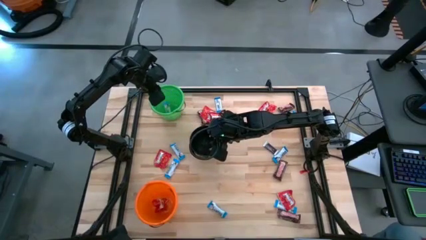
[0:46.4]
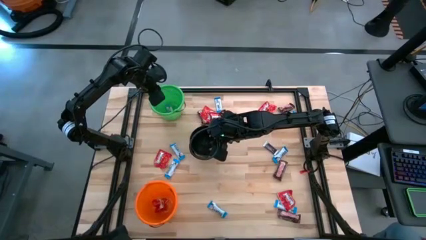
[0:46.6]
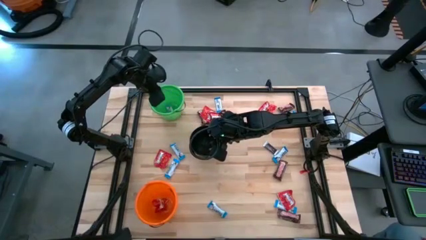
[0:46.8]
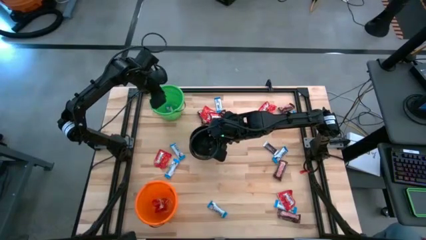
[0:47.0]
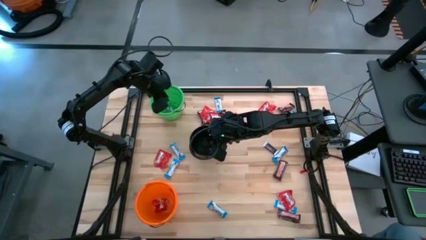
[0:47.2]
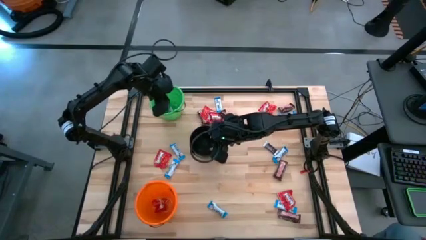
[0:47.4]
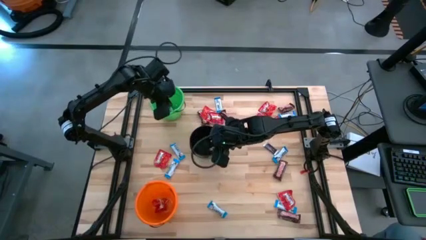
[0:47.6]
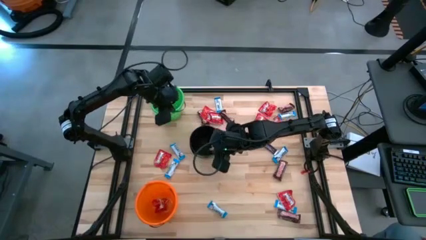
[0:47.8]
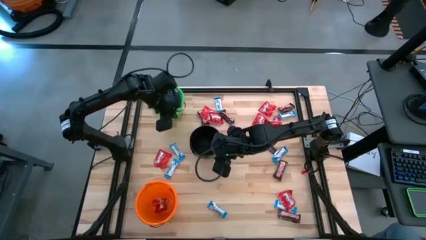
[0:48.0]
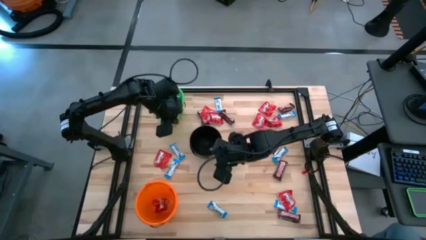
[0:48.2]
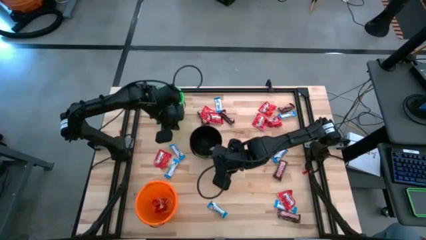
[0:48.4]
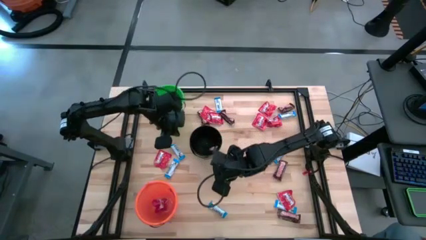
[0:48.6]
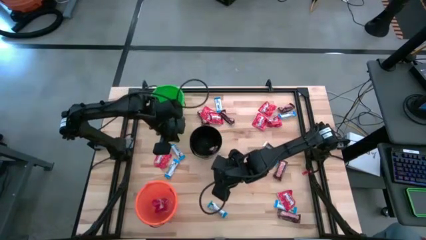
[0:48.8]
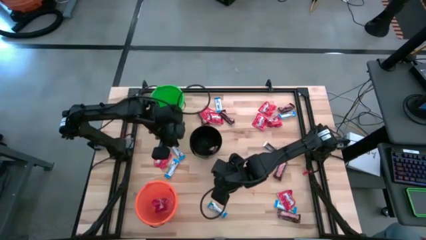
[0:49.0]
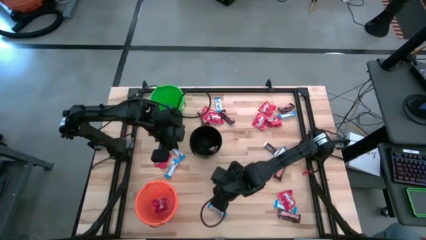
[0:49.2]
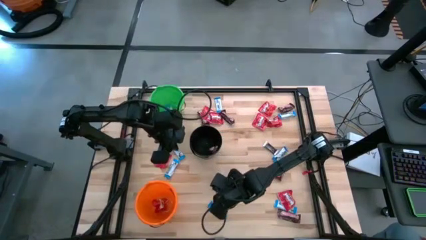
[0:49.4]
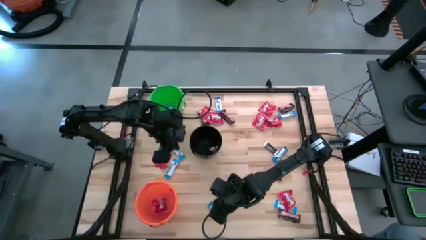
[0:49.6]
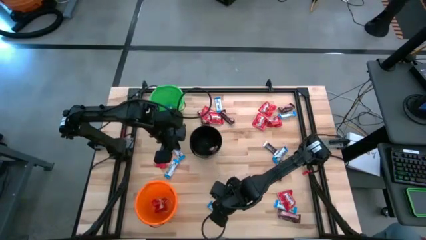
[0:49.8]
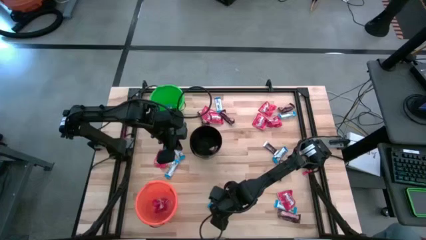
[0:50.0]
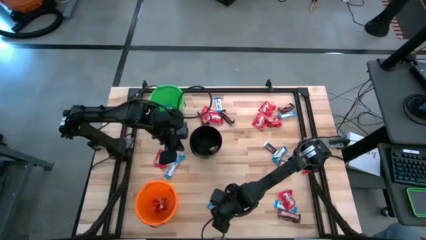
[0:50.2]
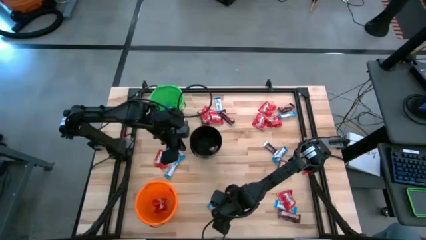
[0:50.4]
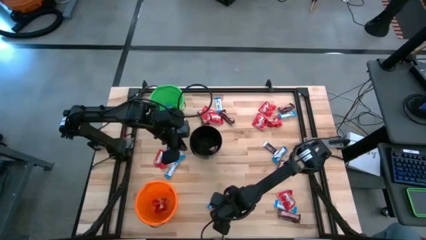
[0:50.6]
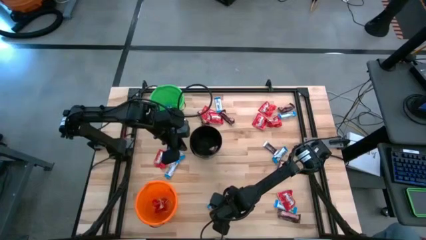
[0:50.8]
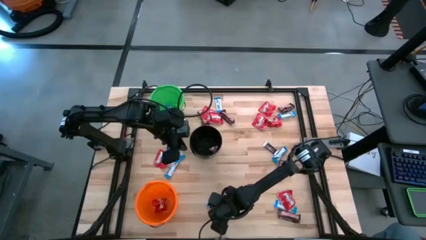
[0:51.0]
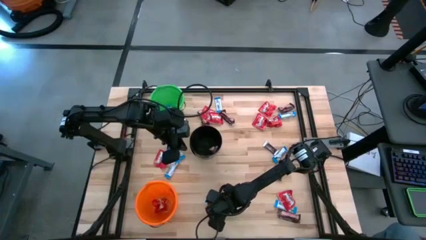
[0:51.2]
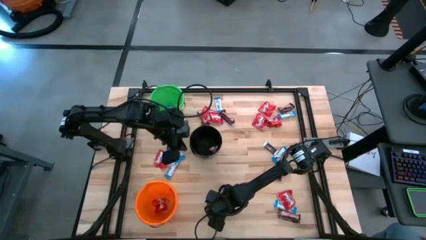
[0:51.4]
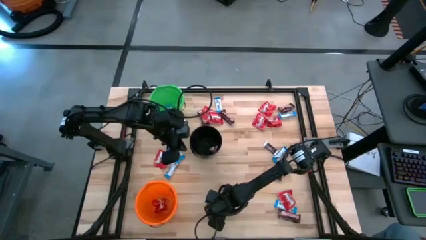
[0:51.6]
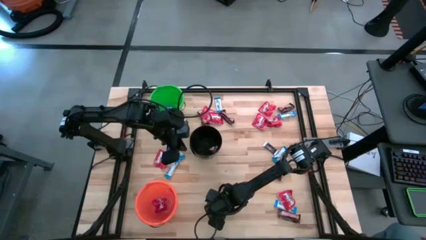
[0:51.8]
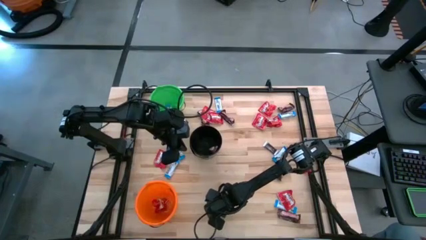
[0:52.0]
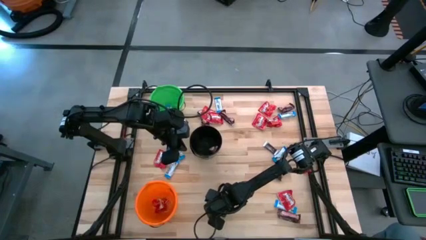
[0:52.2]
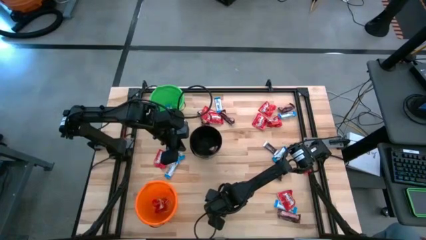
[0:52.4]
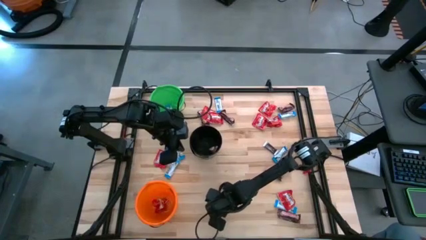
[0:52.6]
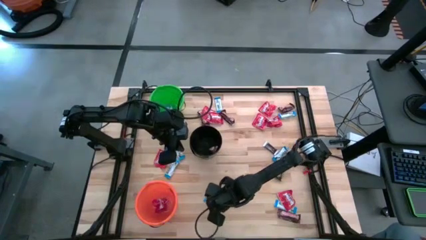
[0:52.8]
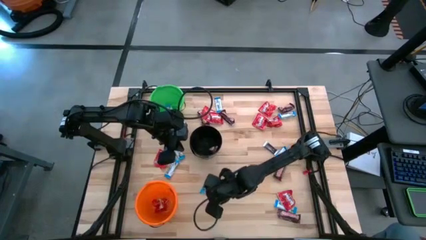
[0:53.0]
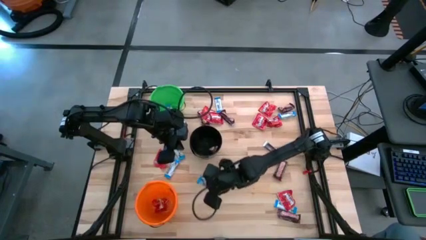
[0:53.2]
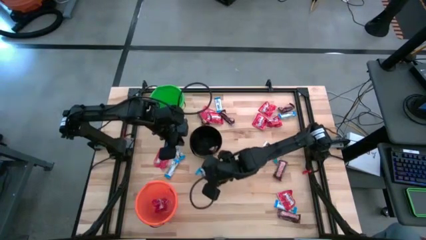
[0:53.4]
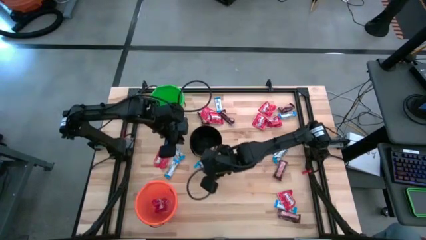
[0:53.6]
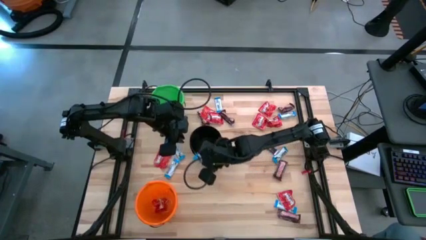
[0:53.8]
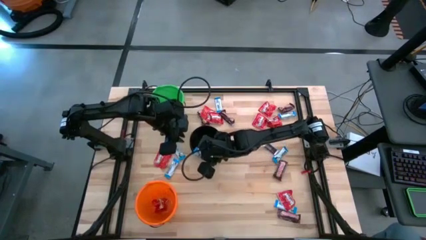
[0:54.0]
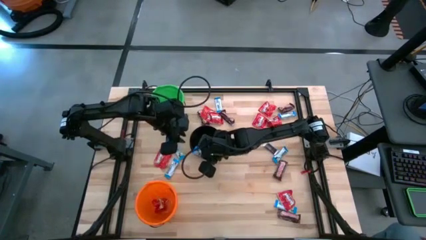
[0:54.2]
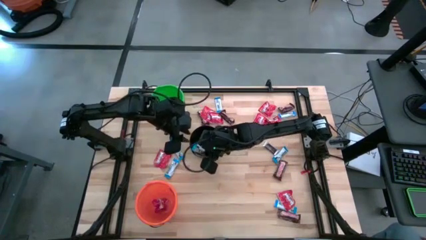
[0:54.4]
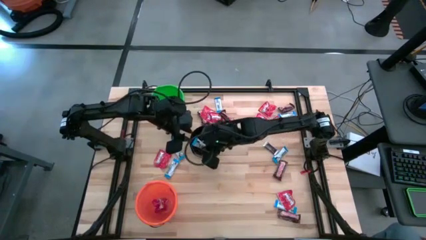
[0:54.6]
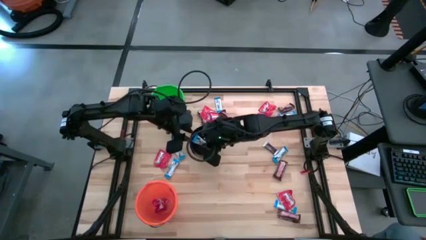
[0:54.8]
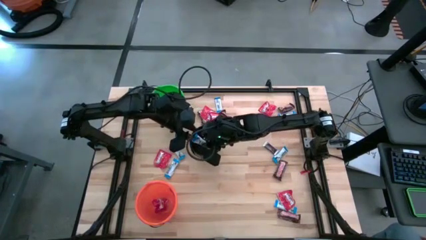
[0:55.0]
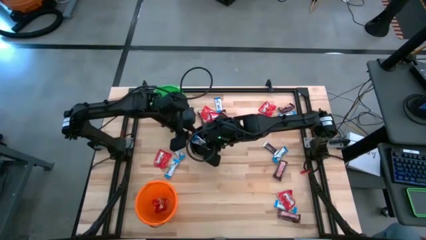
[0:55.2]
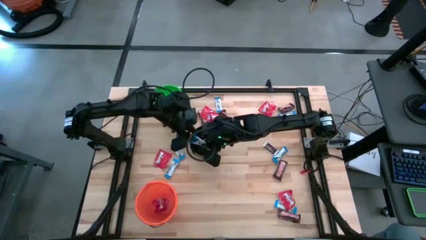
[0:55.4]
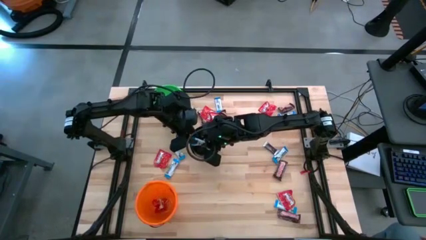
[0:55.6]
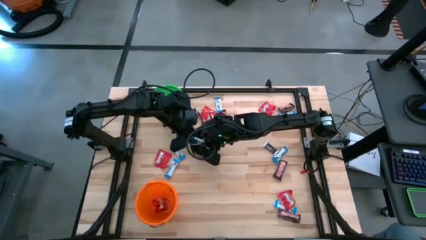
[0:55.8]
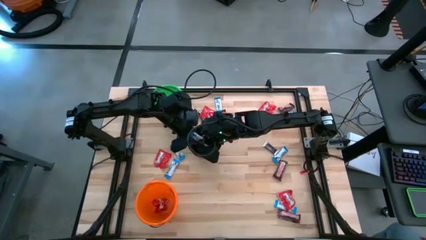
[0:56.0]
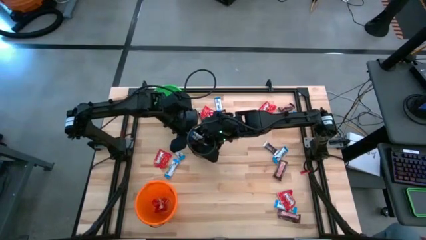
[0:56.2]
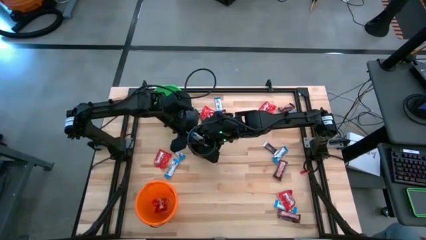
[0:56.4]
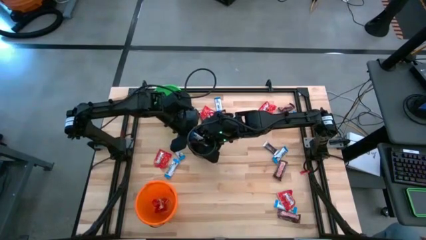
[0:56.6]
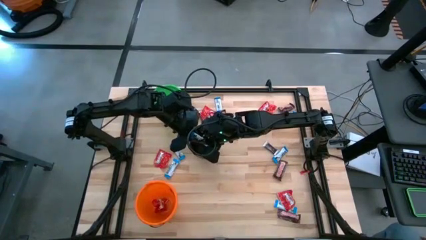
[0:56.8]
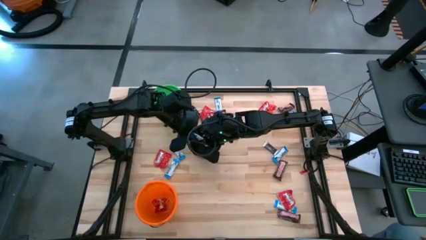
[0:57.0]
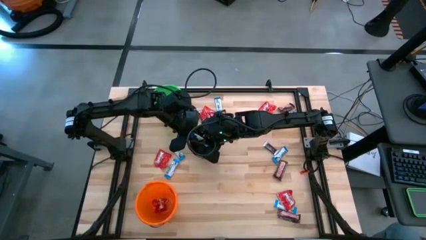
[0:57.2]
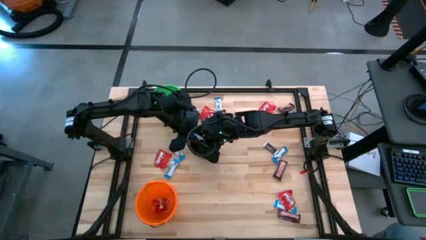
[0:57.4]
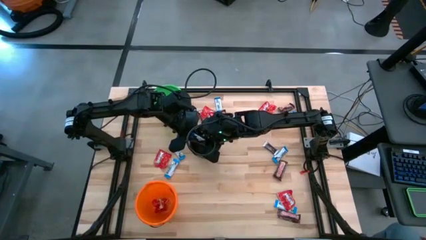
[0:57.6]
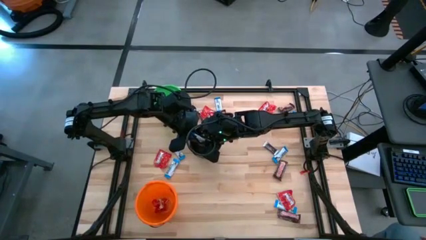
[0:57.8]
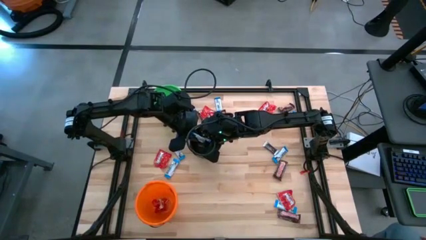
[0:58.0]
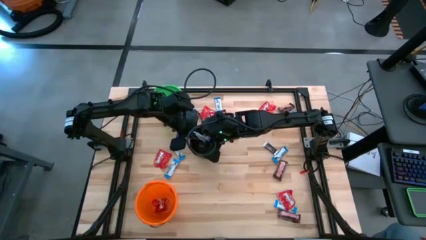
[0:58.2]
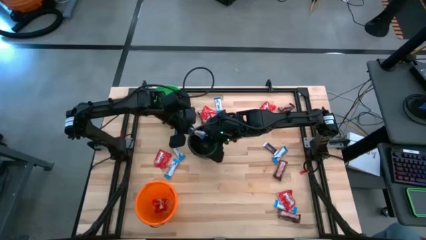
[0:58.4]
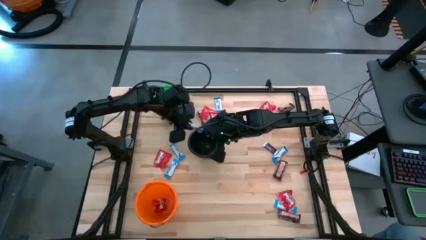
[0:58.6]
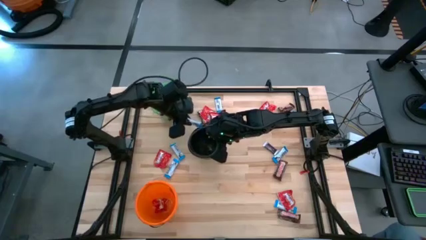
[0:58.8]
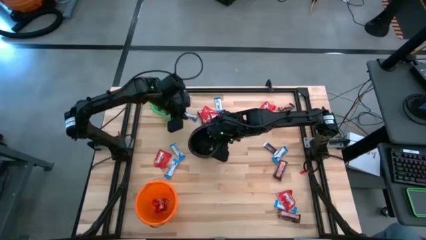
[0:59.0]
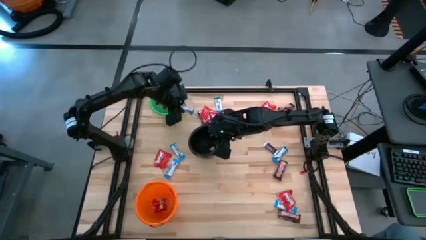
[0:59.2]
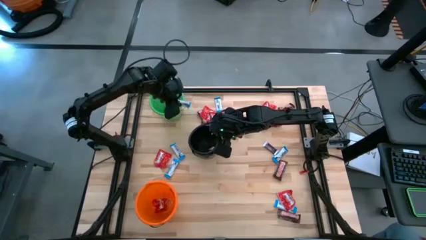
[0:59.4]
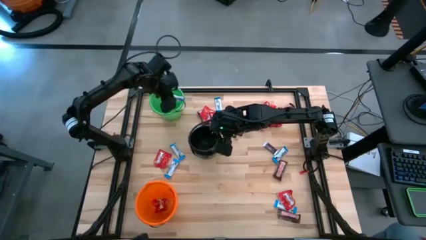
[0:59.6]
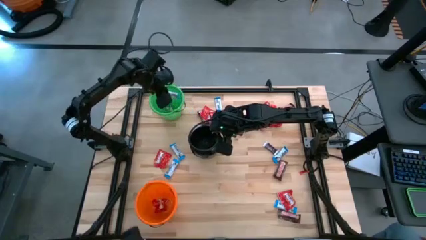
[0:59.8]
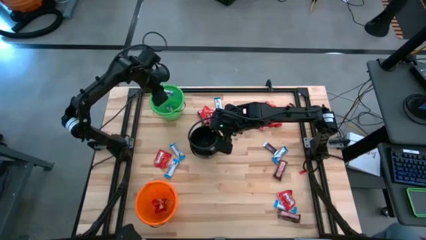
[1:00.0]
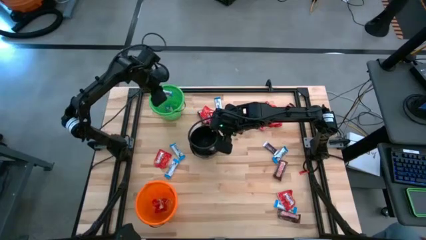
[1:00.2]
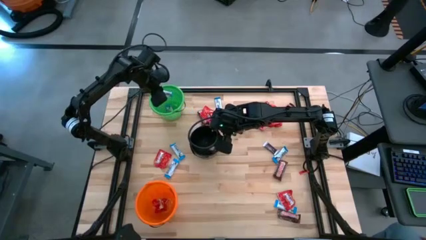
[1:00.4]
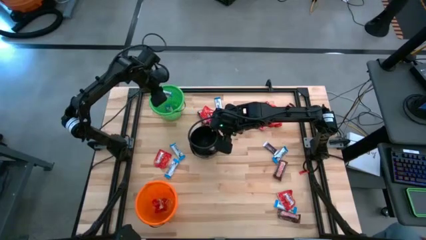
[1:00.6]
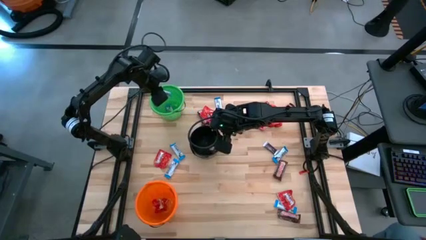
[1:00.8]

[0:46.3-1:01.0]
Task: Sort candy
Put the white chocolate into the green bucket

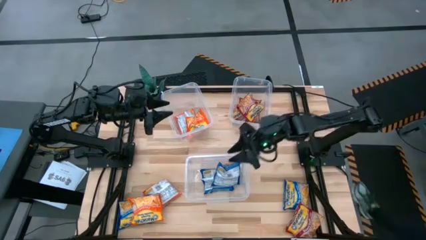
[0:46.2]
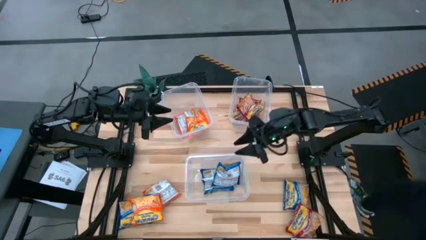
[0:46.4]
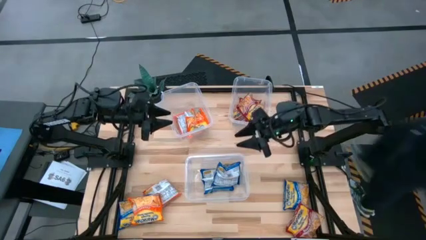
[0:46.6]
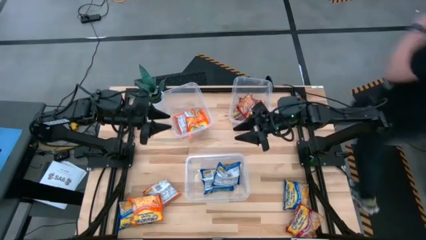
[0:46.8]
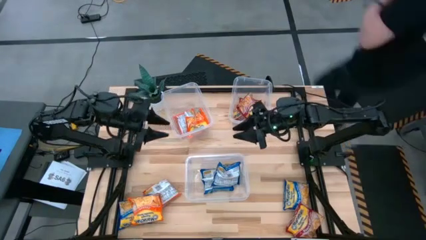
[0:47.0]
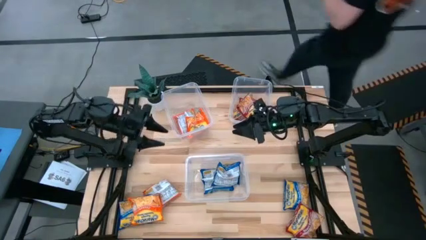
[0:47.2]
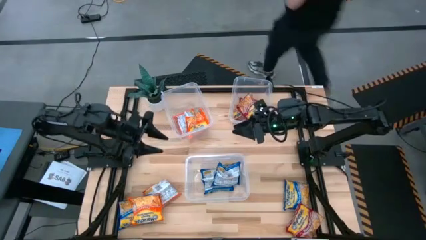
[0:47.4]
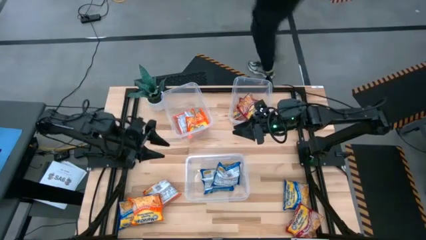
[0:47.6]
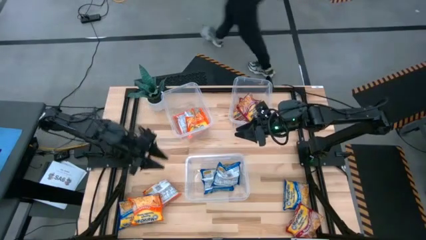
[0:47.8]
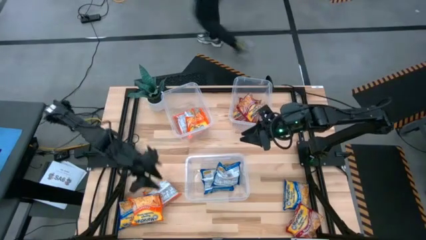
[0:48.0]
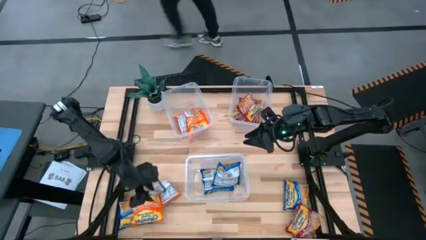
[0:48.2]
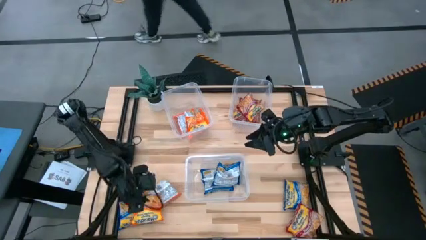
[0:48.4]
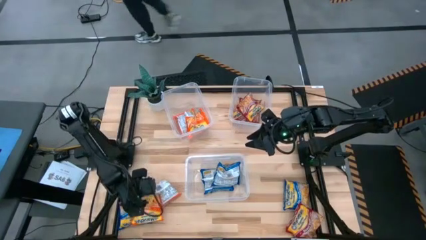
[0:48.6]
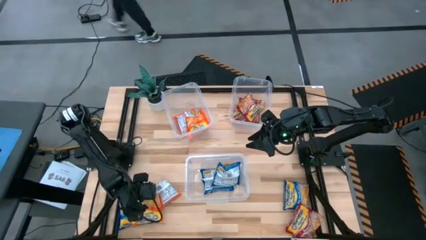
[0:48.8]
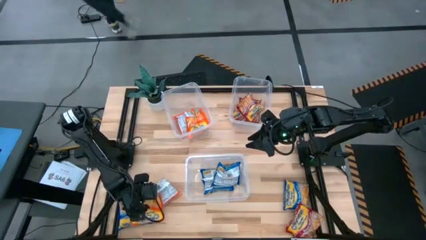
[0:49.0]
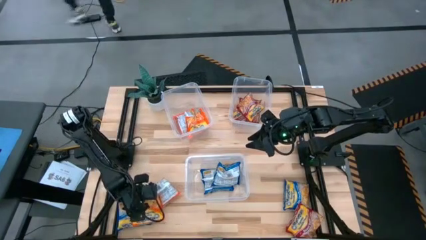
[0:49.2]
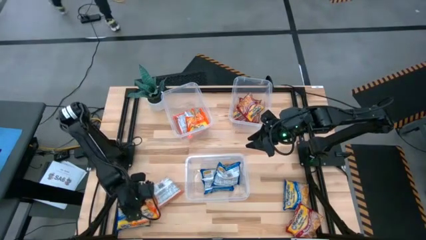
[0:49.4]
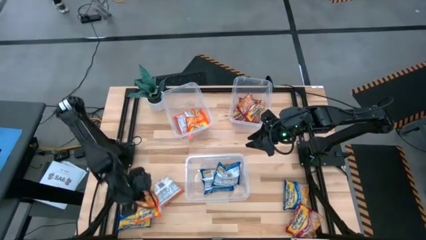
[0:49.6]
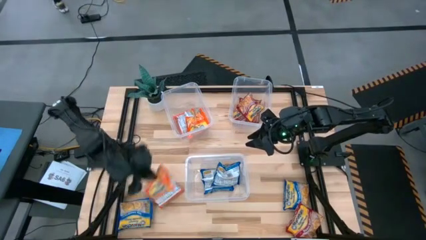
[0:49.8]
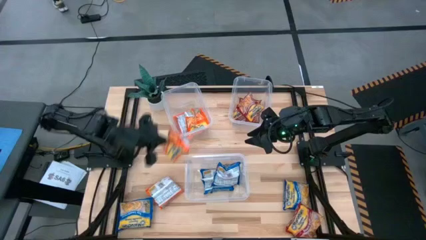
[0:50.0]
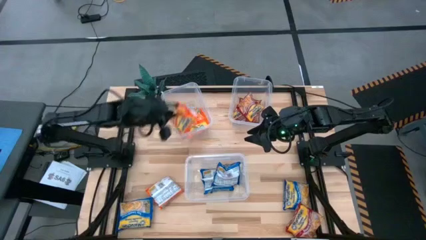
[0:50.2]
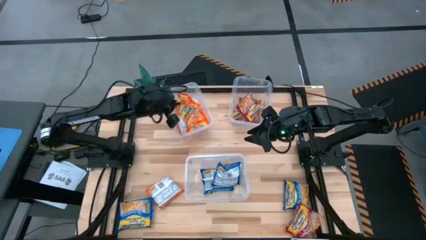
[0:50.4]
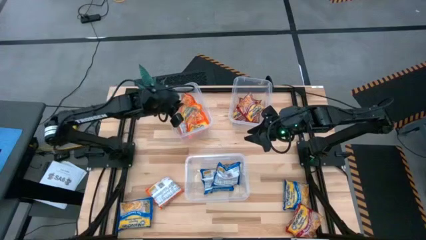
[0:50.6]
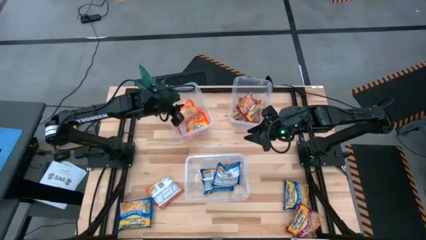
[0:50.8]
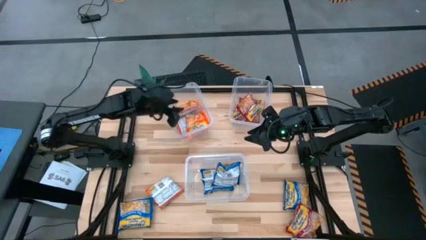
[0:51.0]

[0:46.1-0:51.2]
Task: Sort Maruchan noodles
Put the bottom orange bag into the top left transparent bin
